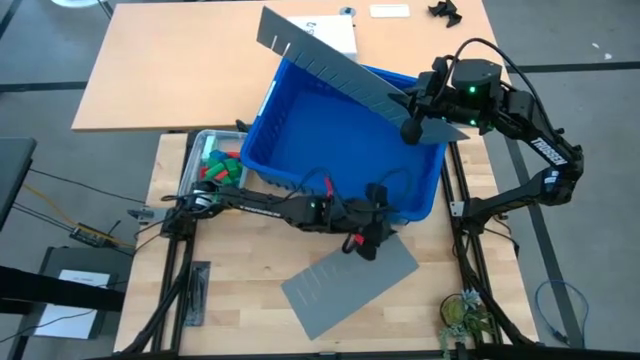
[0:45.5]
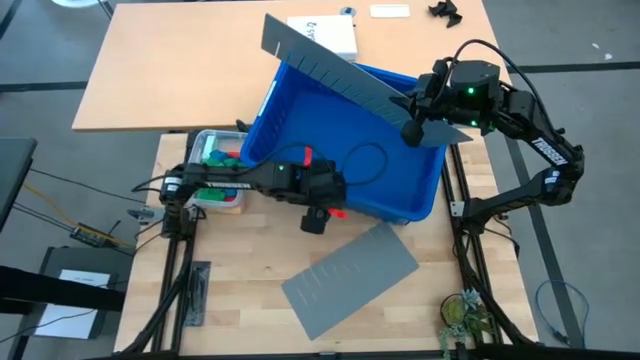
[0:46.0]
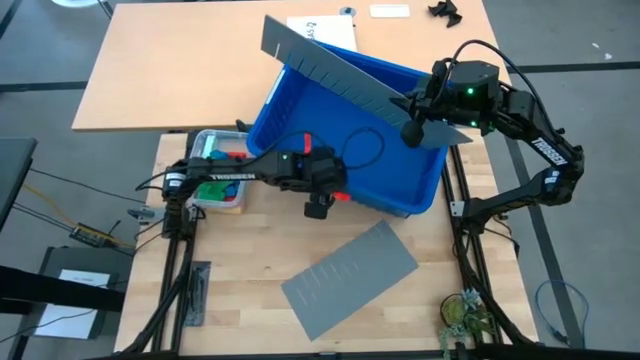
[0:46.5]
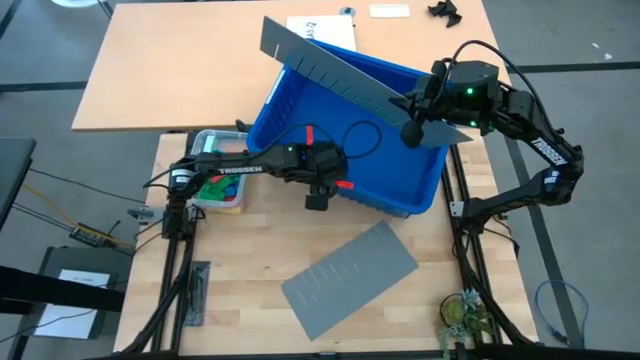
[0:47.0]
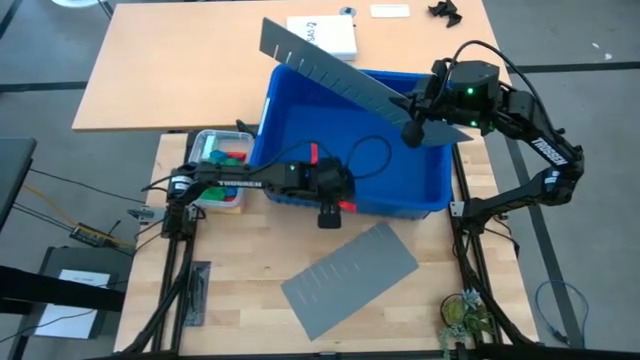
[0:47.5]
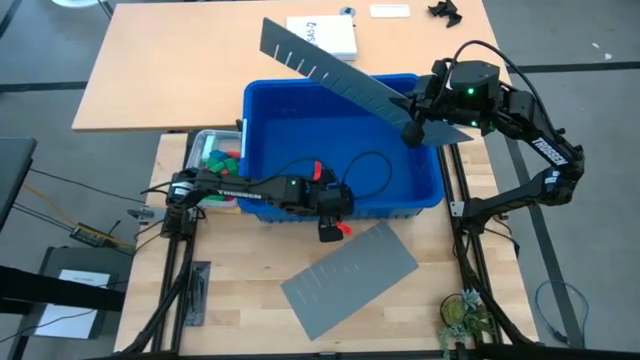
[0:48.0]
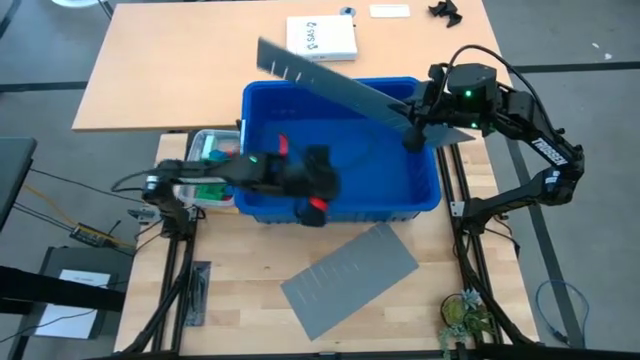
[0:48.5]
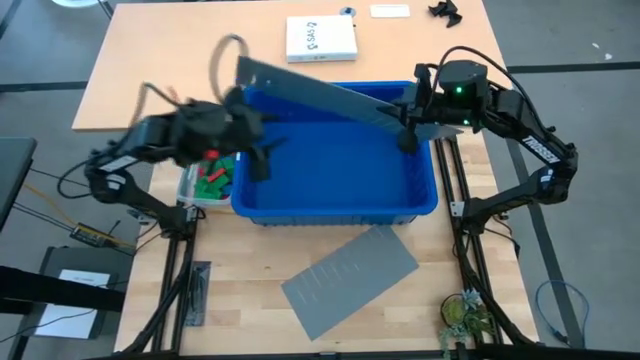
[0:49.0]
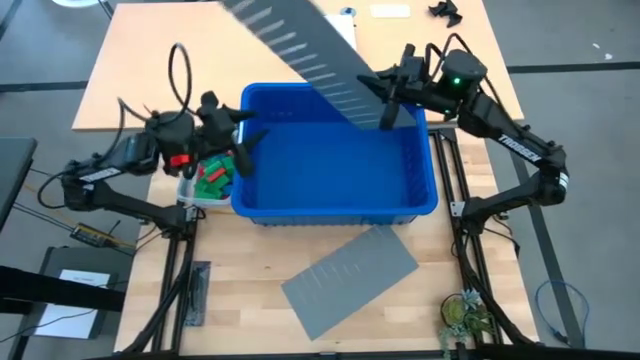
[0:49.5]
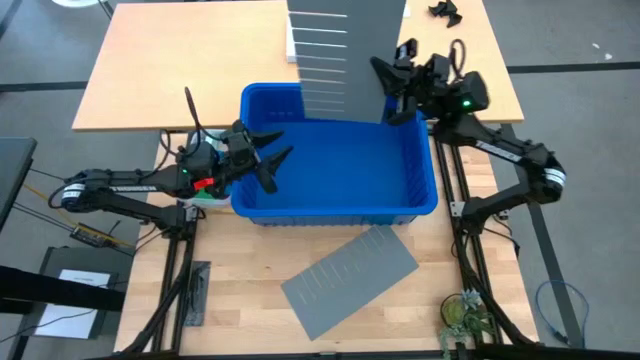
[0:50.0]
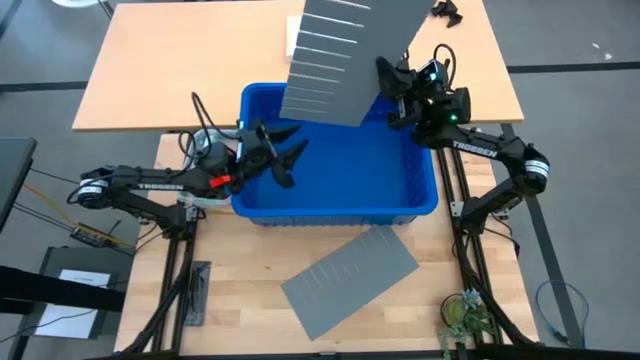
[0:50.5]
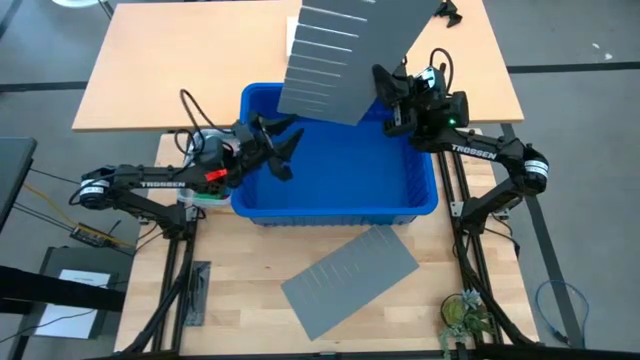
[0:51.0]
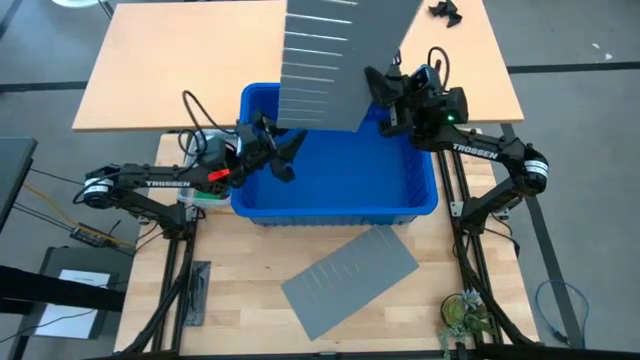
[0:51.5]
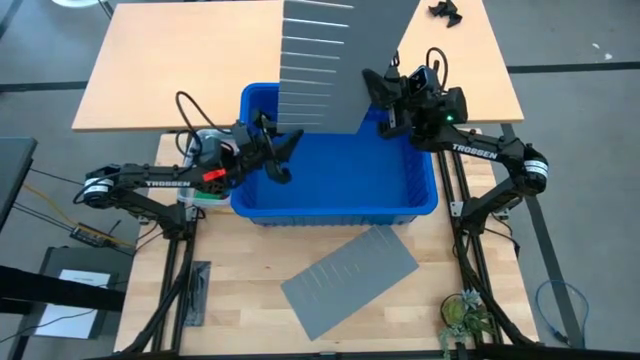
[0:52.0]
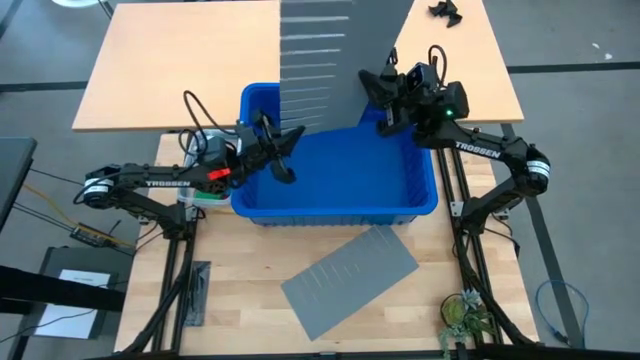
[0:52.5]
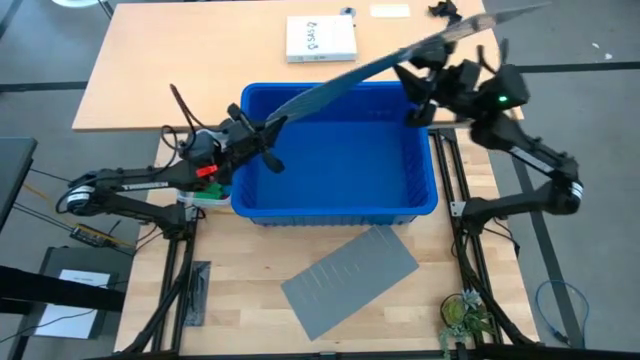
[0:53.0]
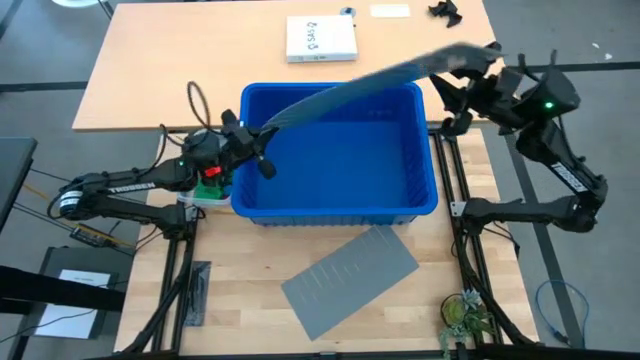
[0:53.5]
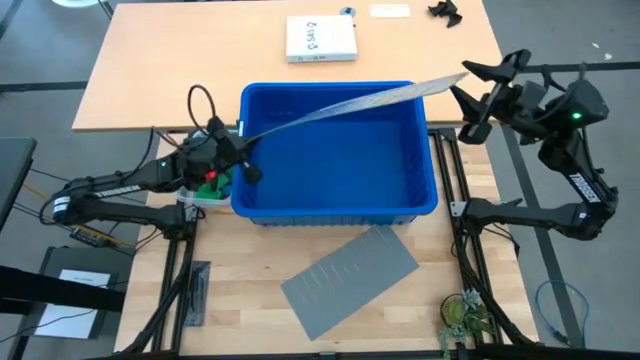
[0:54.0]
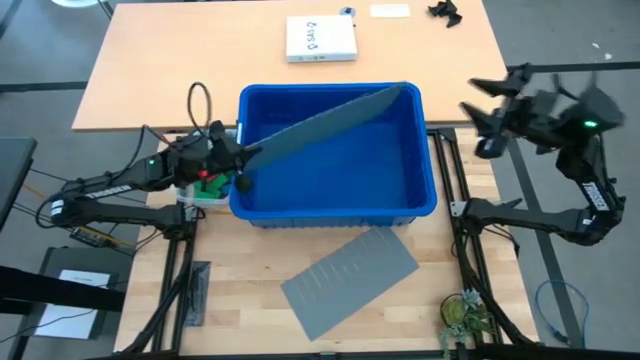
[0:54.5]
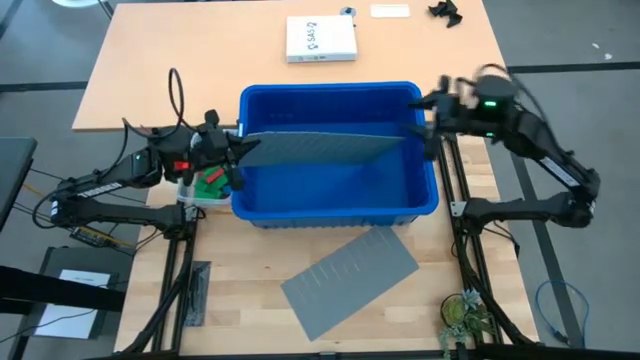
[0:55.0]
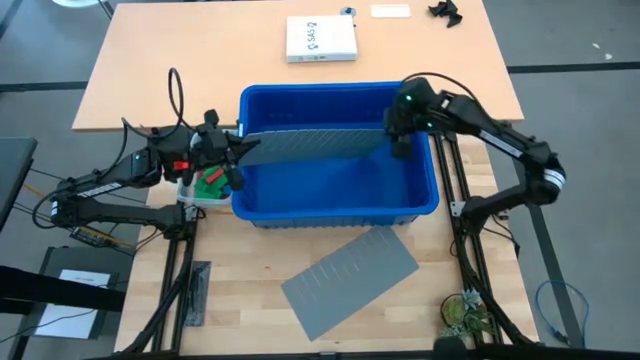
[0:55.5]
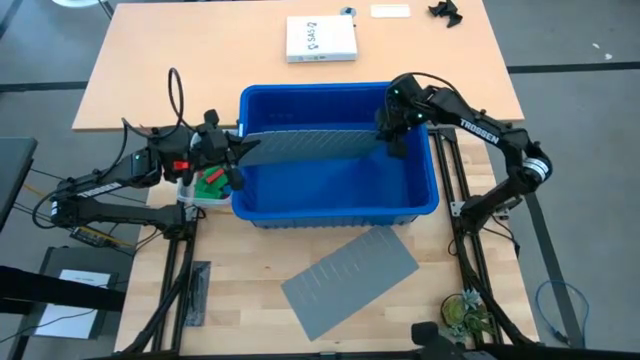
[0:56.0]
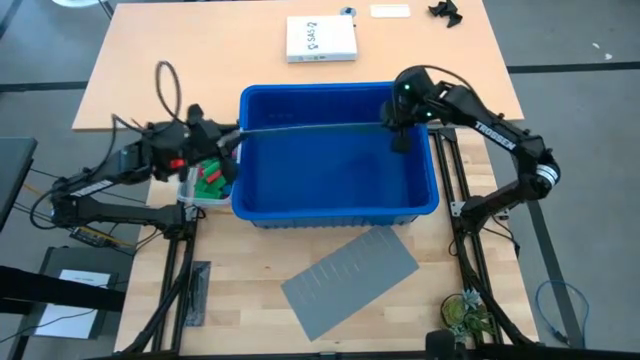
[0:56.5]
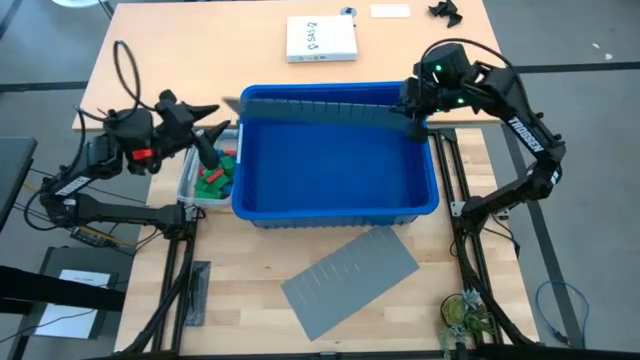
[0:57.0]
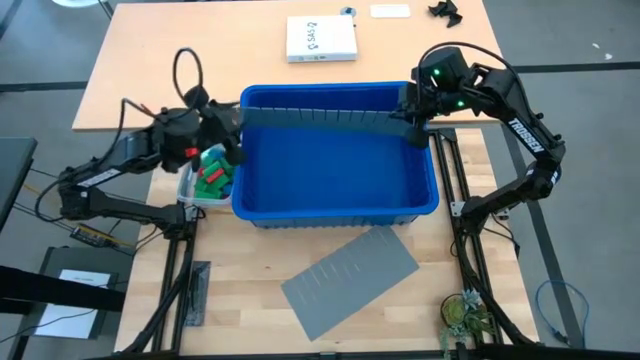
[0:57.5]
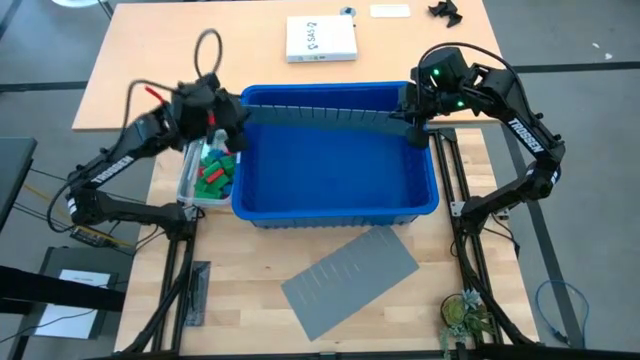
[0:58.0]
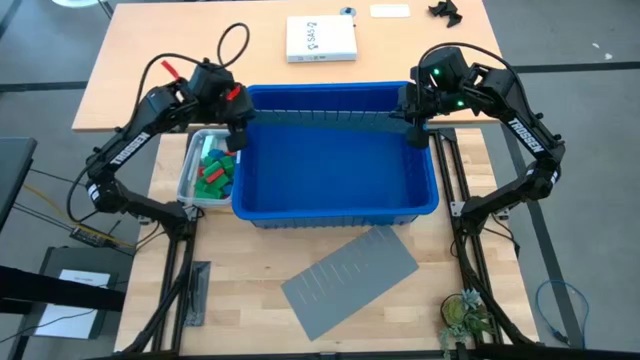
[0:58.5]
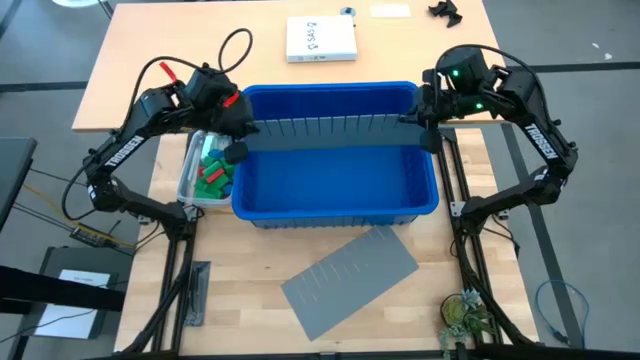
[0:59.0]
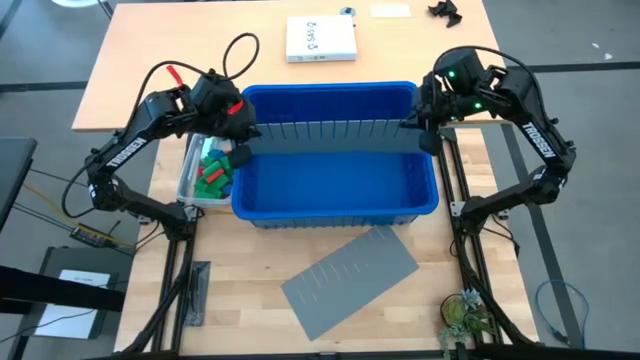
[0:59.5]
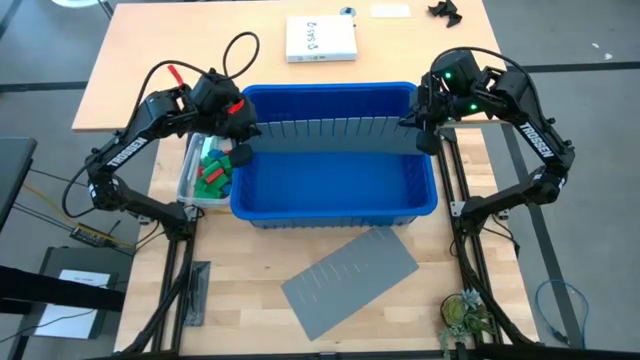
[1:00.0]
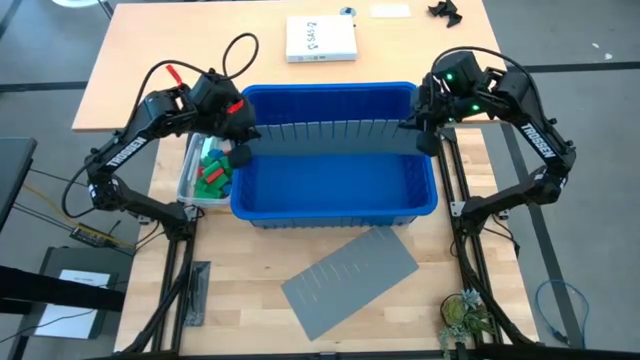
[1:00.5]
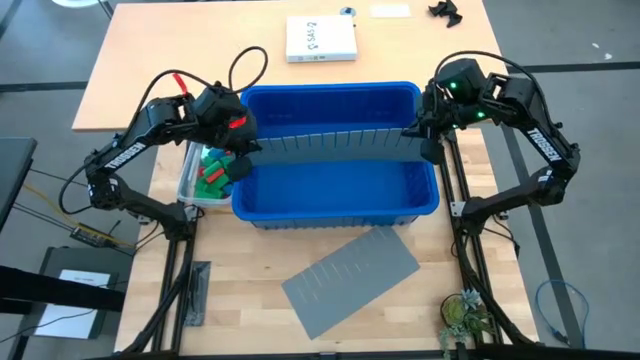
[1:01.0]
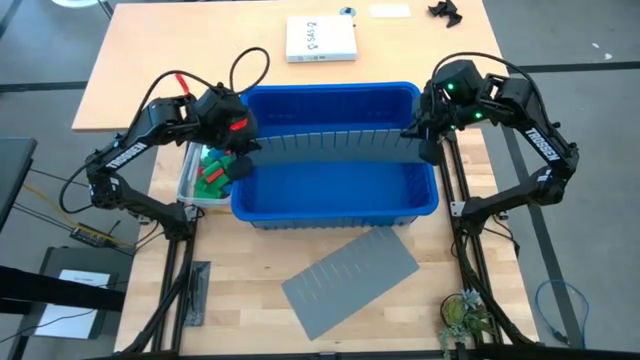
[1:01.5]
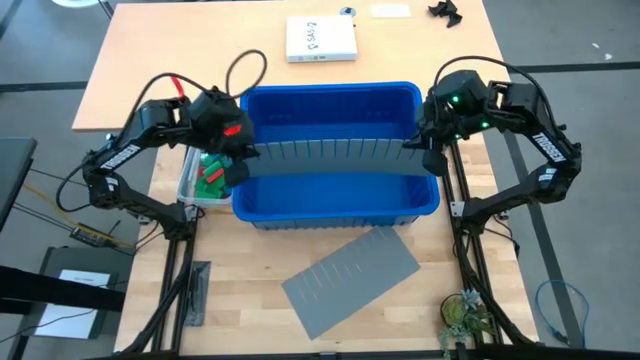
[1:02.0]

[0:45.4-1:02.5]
Task: Sort blocks
Assemble the blue bin using bin divider
